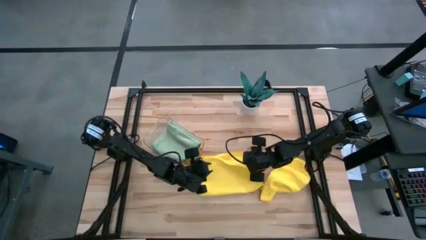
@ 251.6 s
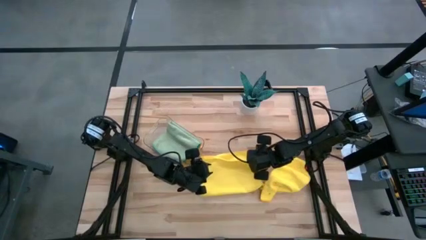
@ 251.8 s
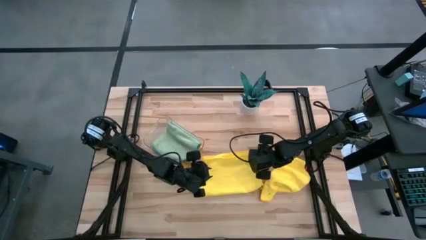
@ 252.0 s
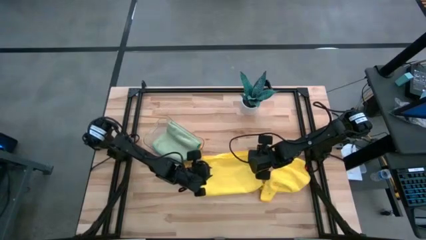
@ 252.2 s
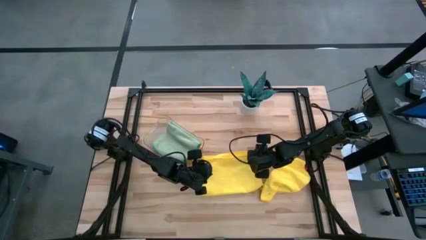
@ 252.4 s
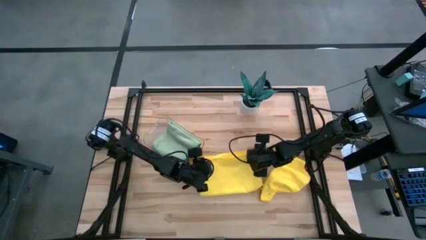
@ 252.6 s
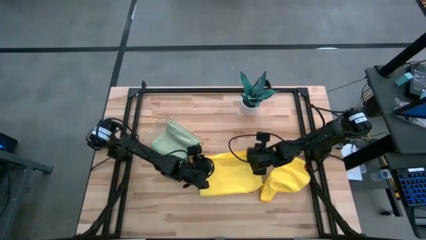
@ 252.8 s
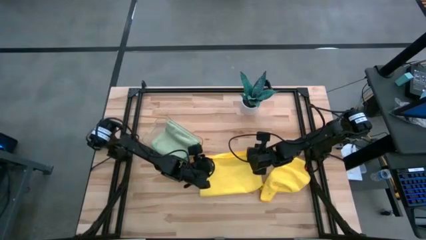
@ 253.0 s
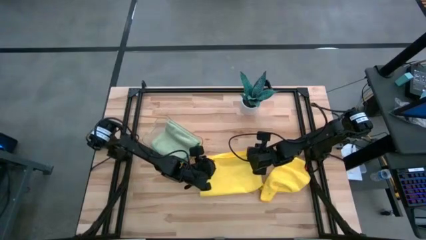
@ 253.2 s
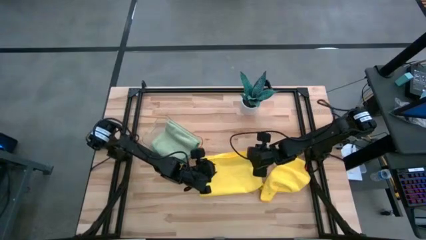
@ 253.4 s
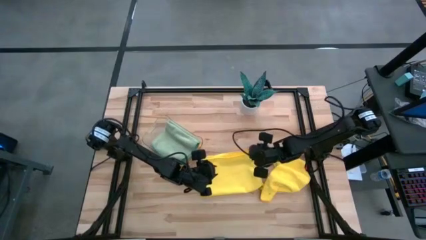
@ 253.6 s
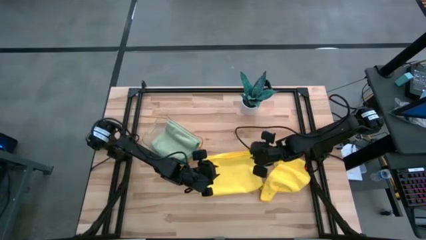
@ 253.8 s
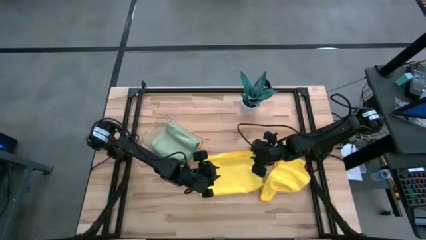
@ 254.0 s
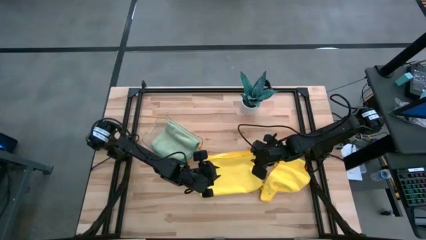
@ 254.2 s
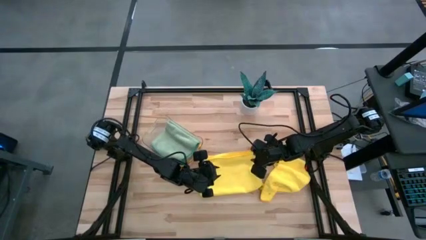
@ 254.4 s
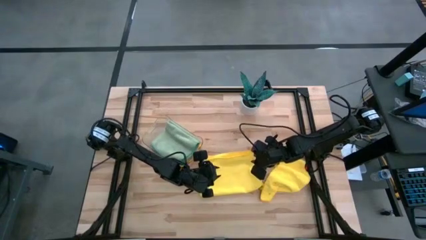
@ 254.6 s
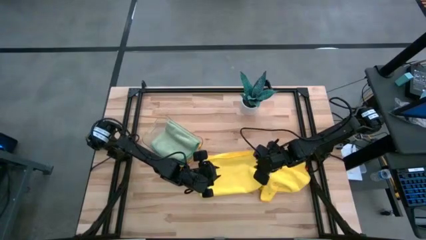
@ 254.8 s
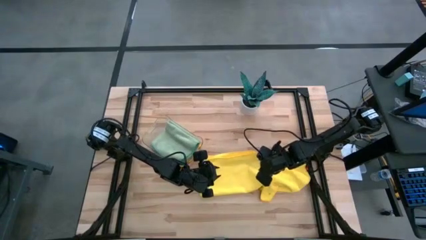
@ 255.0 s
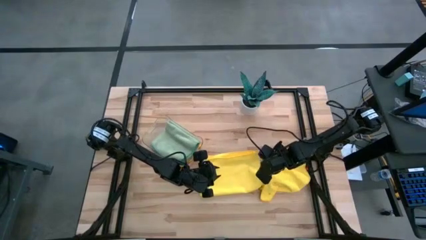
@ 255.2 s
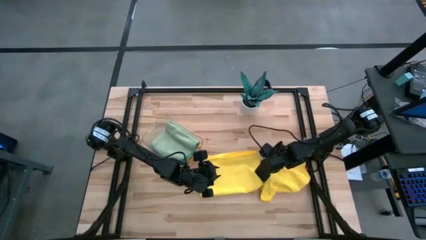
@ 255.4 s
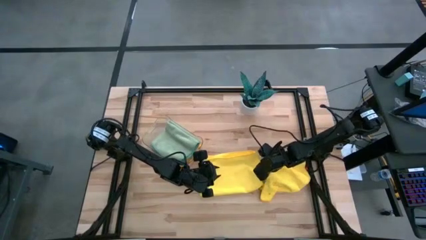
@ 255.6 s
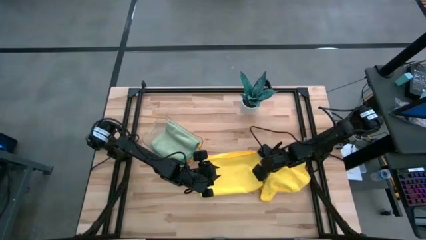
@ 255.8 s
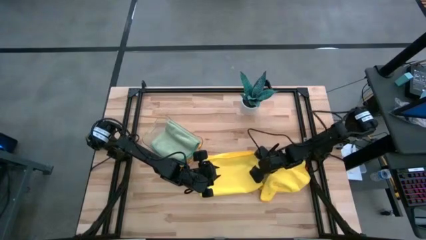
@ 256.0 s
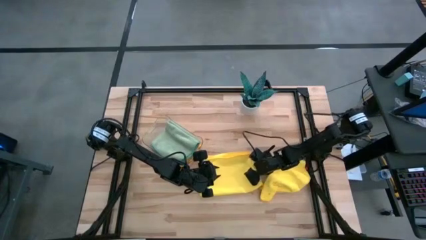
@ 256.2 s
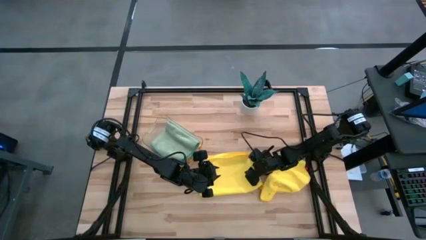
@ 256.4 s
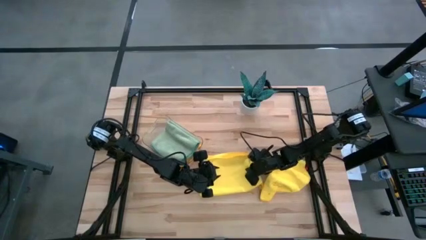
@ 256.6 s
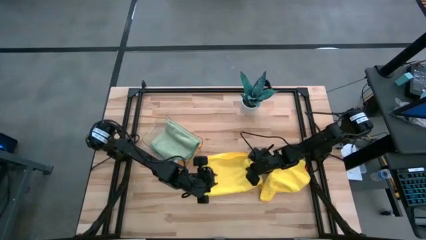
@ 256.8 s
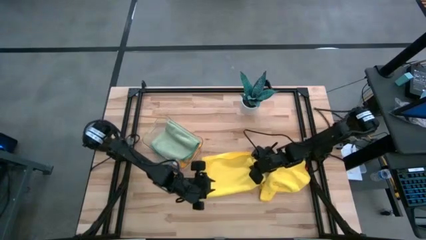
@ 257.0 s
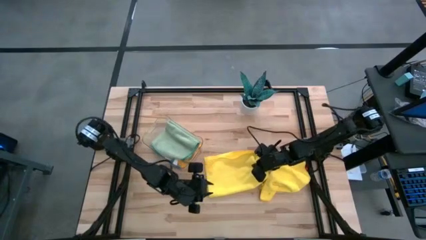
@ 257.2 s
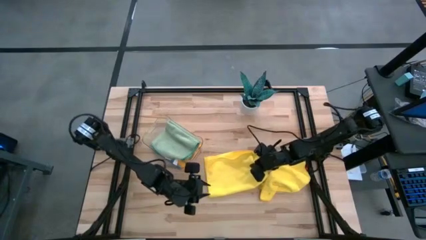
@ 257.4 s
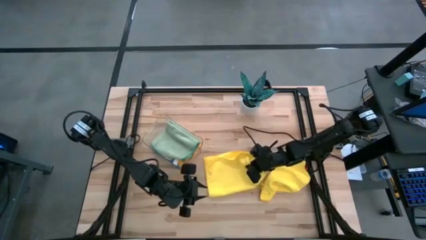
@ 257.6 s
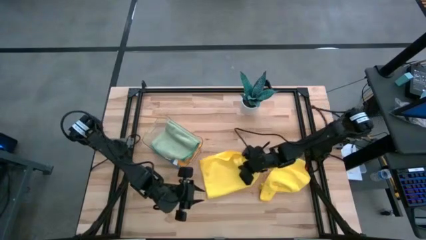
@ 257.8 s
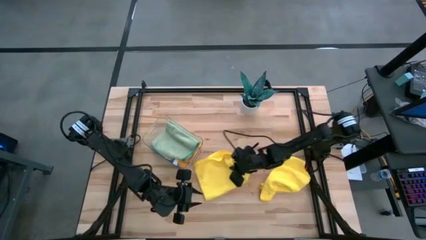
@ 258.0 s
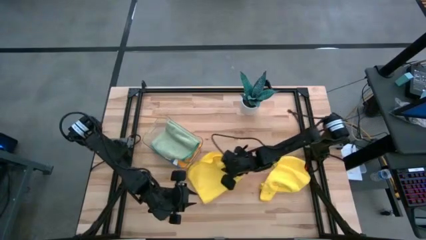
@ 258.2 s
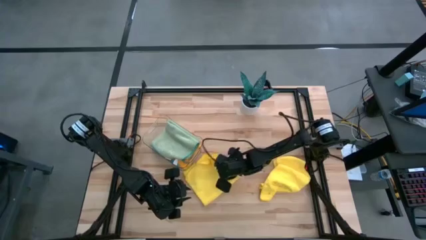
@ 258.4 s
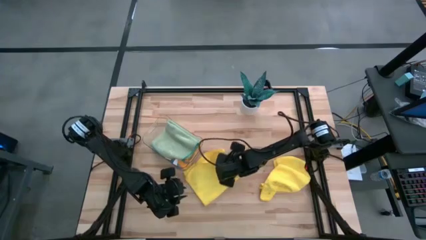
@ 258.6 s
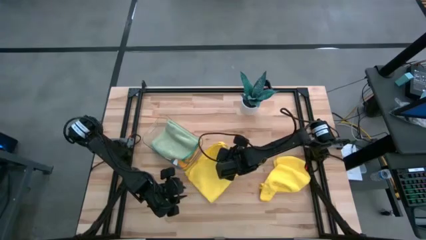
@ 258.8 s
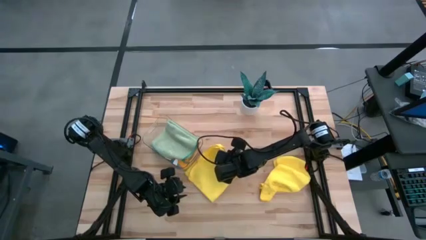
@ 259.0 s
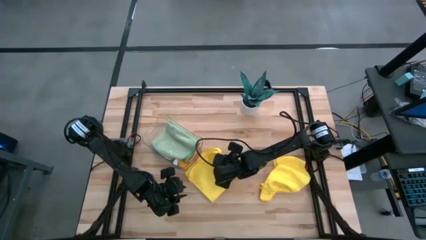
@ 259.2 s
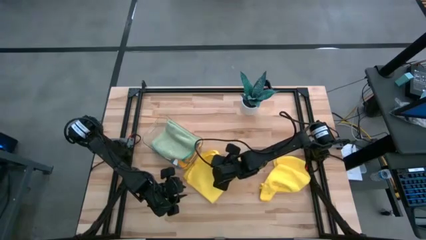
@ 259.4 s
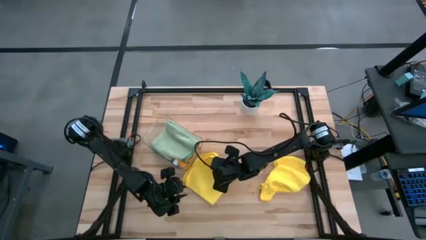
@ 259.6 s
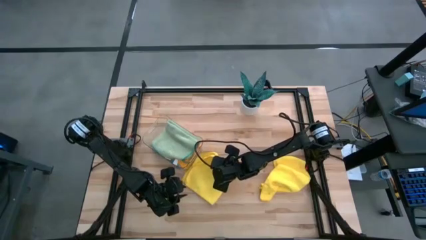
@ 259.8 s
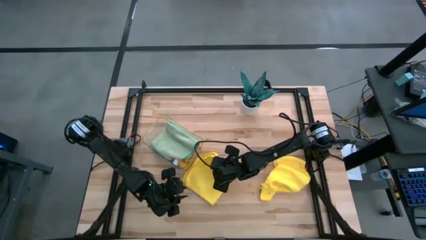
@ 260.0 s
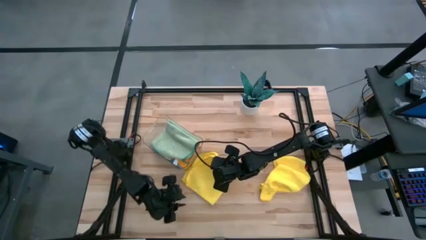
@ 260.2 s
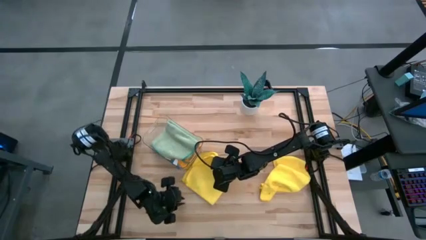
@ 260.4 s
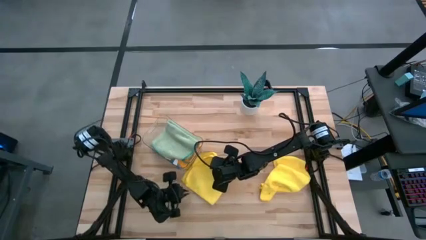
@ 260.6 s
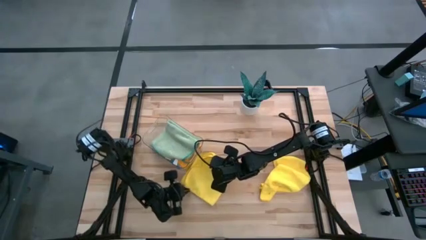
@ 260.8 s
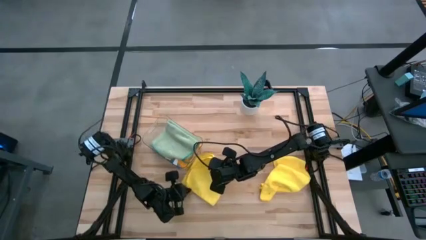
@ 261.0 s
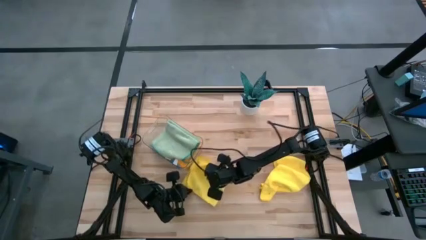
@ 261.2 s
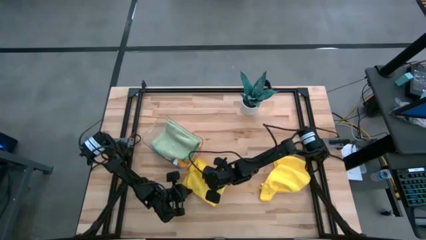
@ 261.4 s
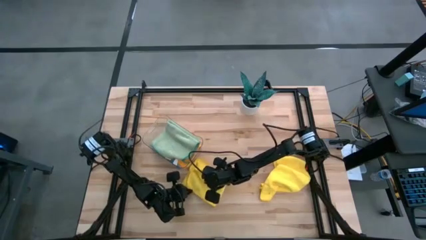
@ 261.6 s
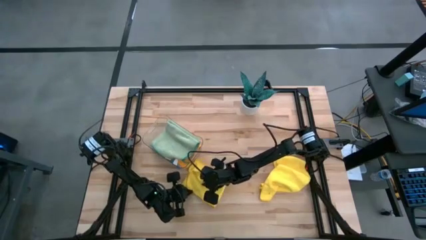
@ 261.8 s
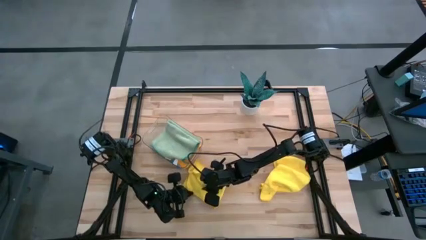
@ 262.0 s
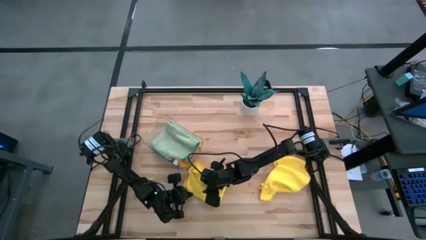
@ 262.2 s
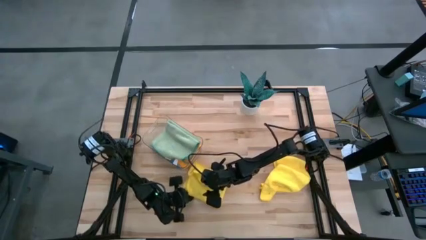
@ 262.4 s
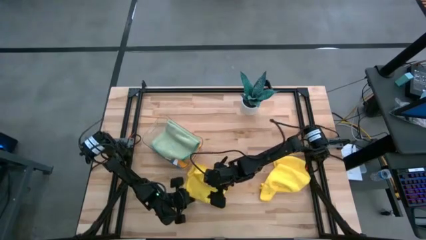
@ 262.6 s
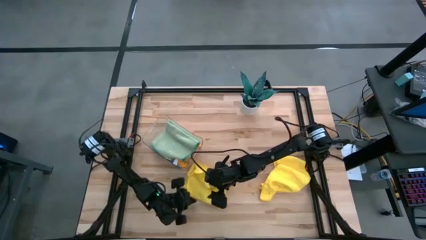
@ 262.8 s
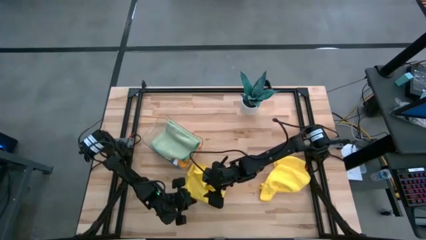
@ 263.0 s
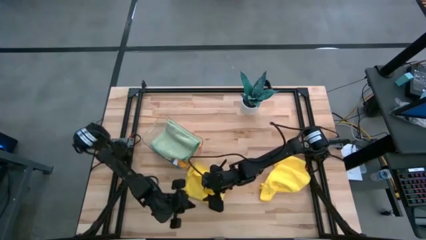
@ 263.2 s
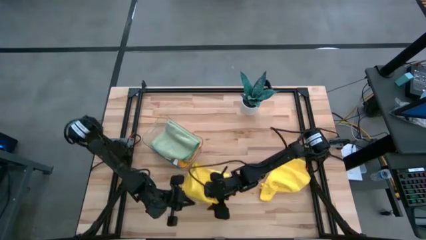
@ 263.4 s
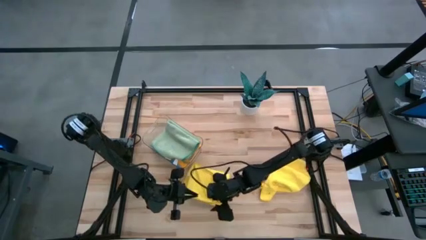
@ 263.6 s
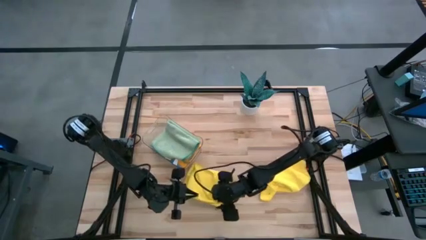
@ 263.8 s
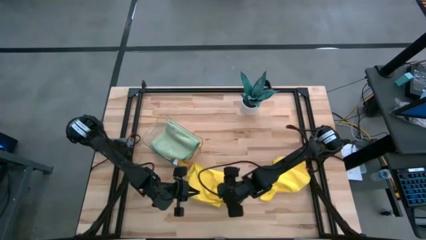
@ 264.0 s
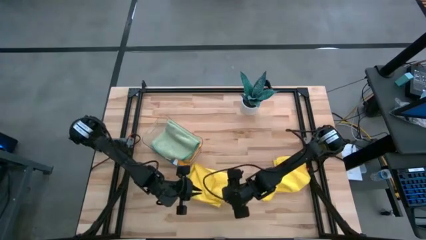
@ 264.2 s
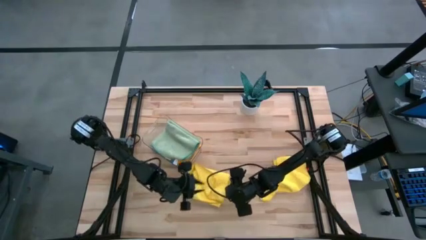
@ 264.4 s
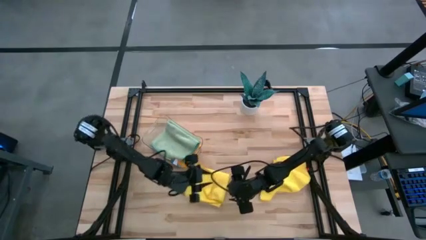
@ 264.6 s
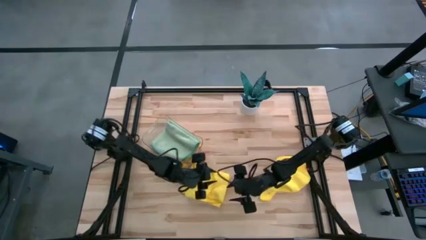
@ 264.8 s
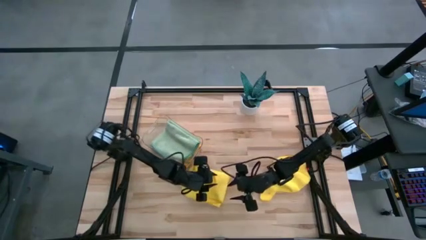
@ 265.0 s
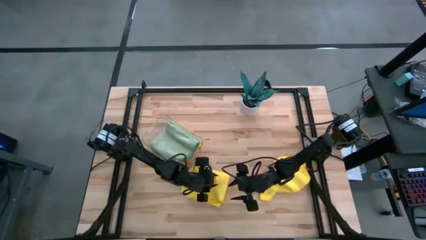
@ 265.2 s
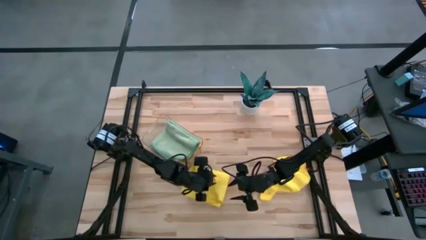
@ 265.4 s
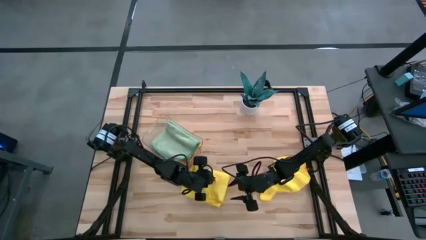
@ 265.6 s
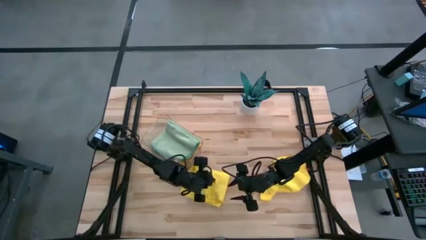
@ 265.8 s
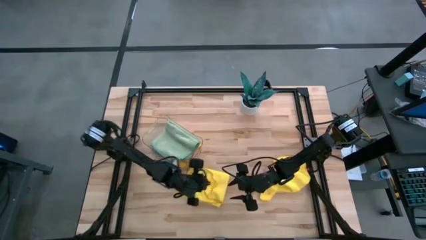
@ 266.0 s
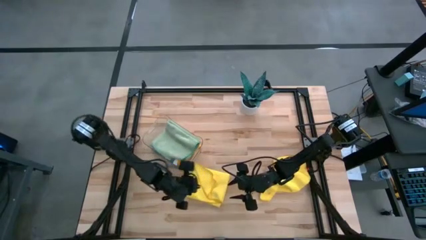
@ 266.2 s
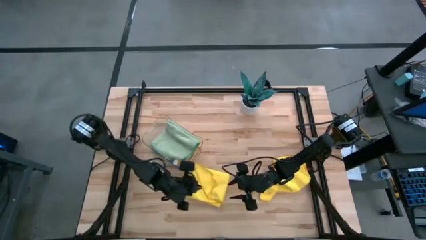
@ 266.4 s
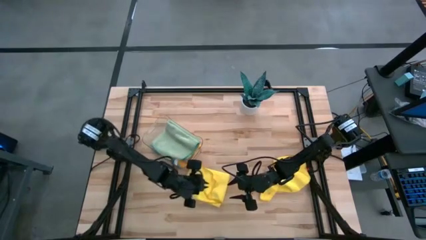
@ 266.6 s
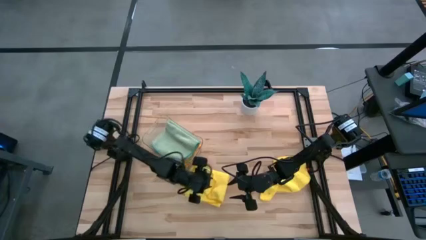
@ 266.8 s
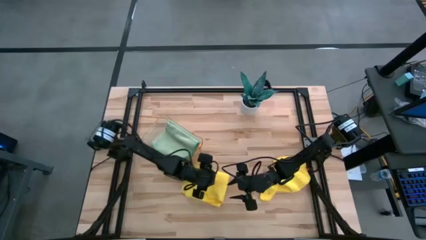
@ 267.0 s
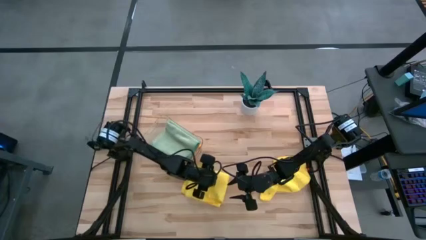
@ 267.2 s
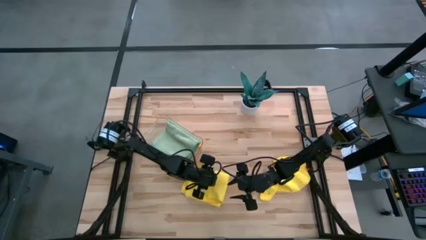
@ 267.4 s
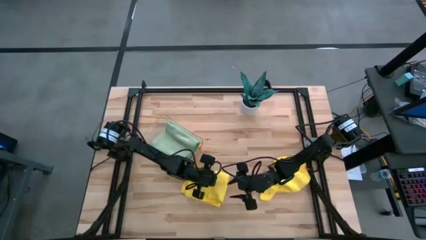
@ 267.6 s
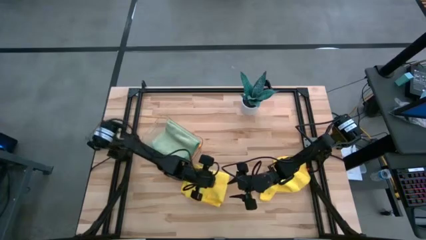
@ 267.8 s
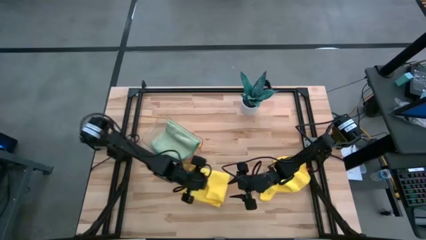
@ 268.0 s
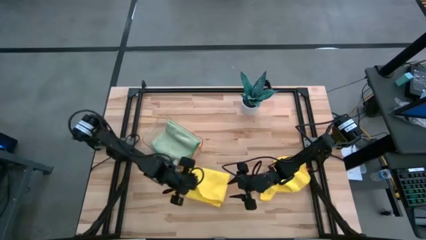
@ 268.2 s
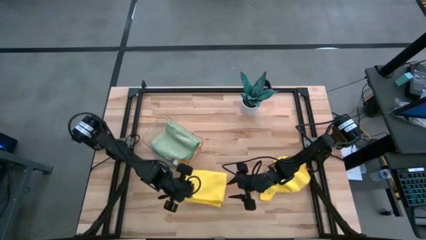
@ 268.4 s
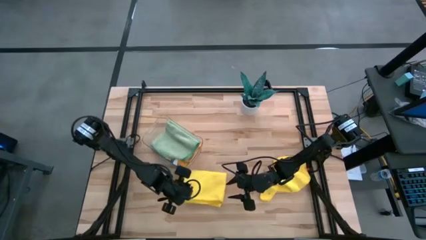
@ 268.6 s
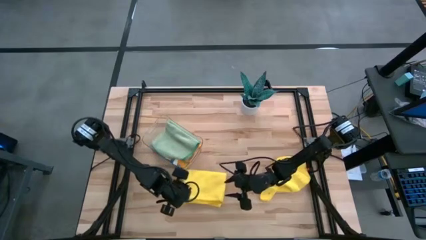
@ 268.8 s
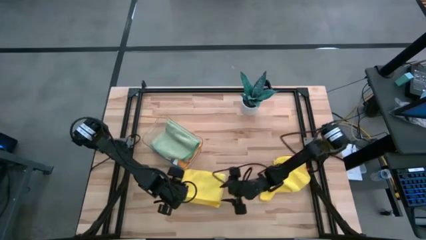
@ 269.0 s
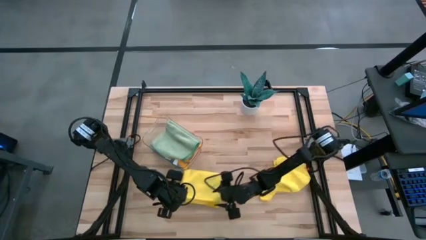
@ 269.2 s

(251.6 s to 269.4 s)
Task: Fold microfiber towels
Fold the left yellow microfiber cloth
